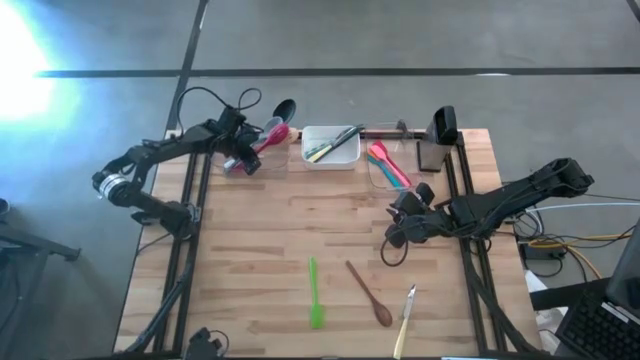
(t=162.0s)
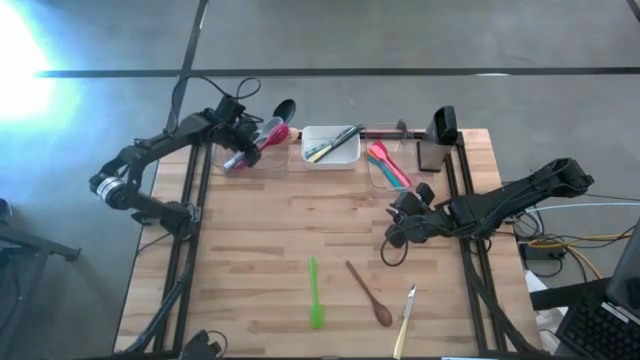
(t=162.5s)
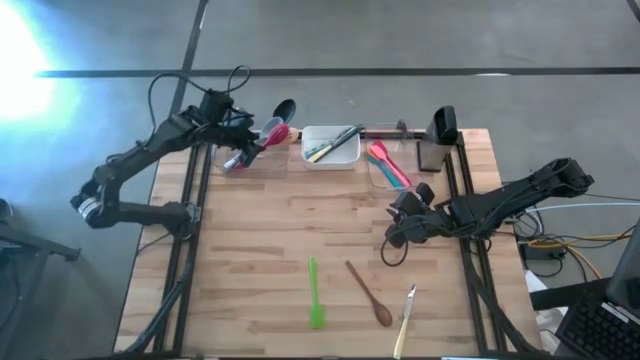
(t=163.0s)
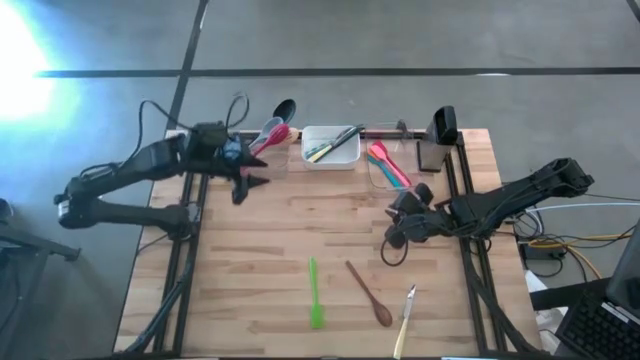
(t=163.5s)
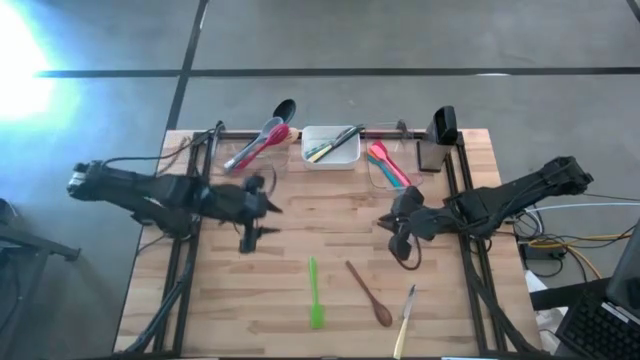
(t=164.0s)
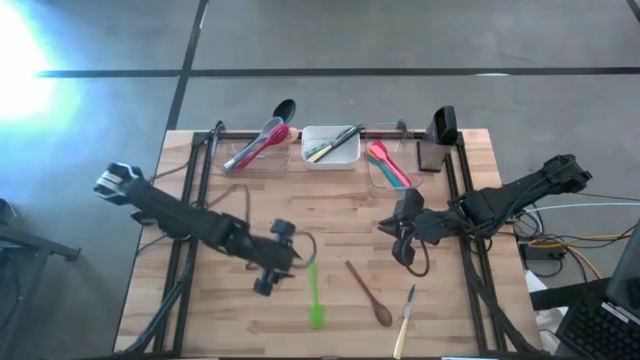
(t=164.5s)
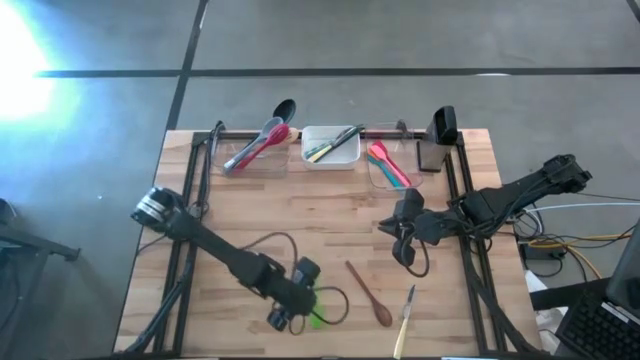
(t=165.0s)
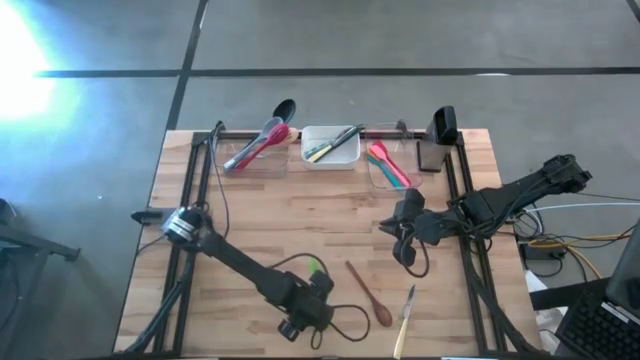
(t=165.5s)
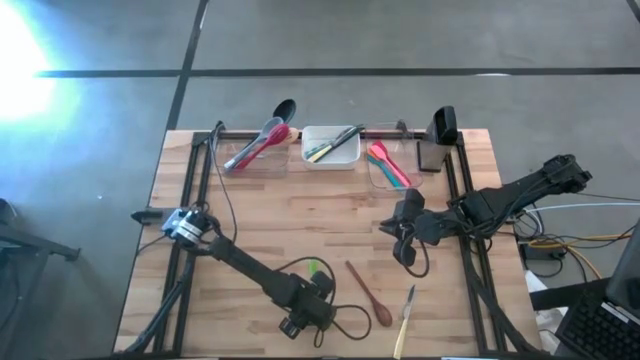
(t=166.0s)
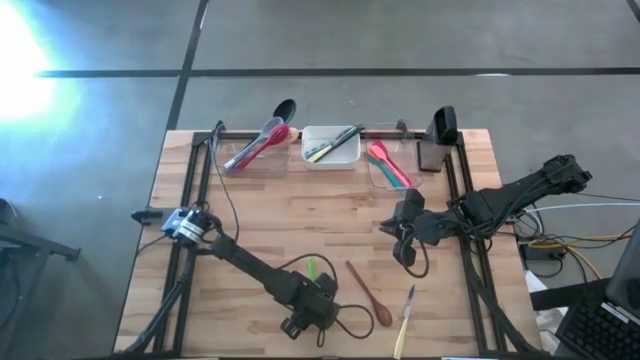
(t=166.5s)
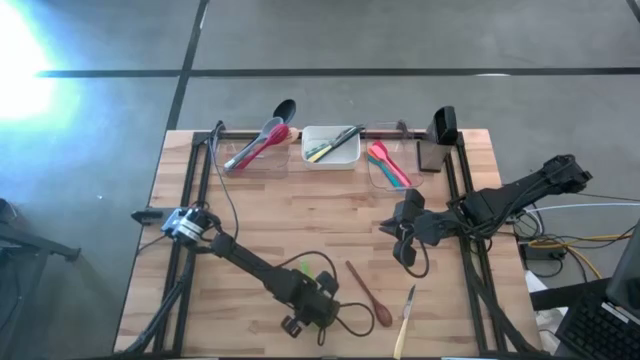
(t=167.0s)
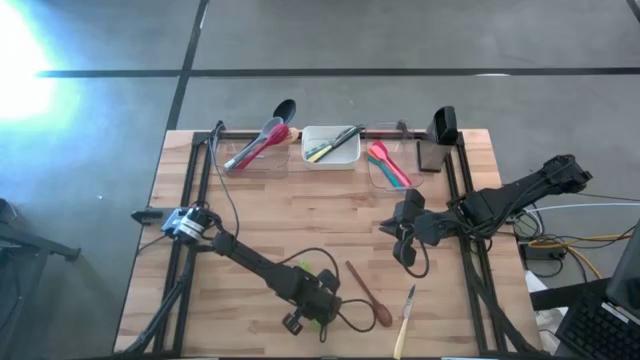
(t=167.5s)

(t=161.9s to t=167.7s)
Task: Pick & Place Kitchen Items
Put the green spatula into the right transparent bin

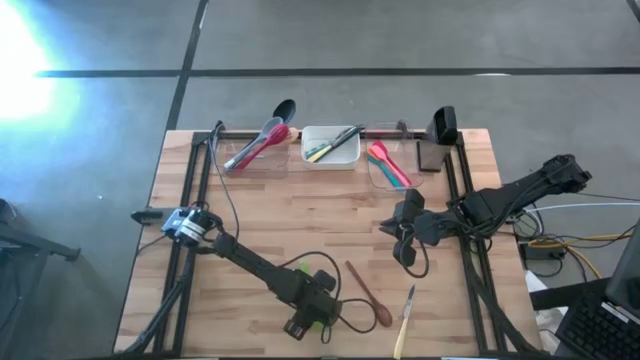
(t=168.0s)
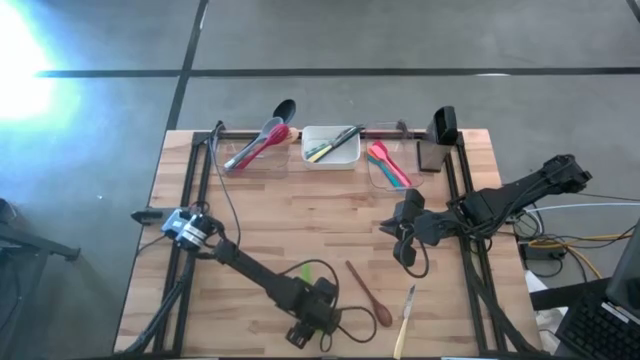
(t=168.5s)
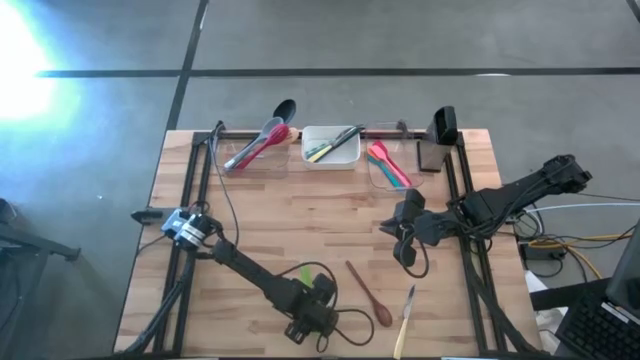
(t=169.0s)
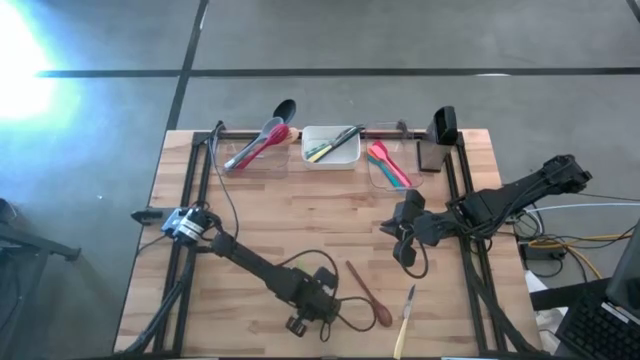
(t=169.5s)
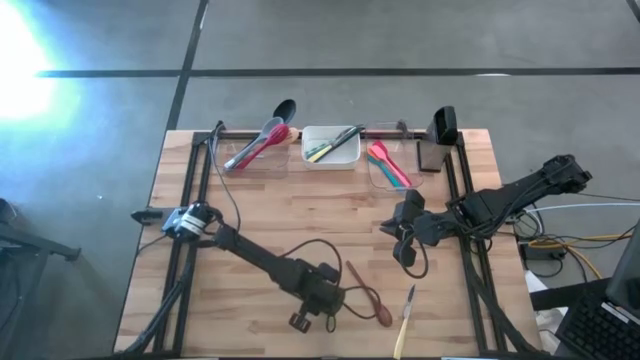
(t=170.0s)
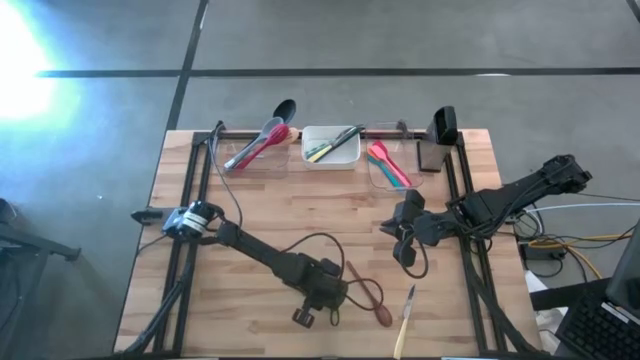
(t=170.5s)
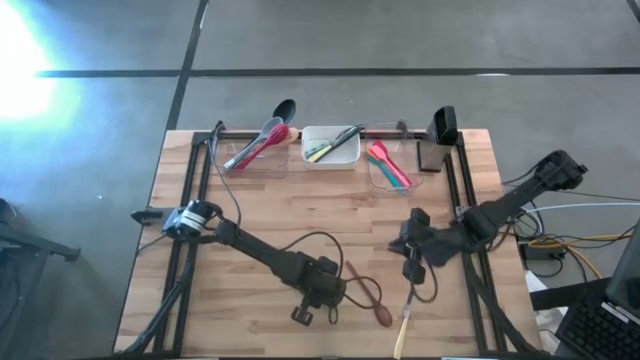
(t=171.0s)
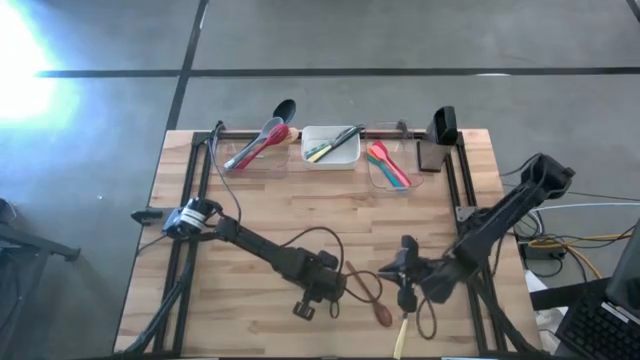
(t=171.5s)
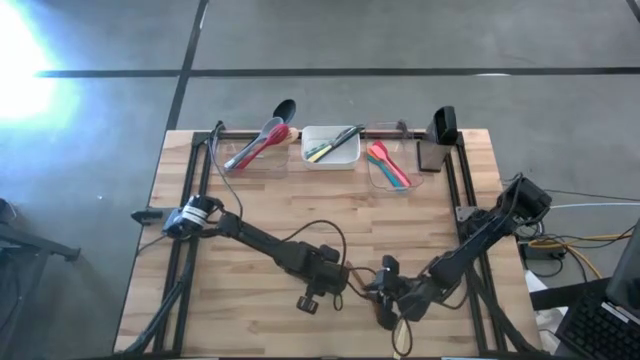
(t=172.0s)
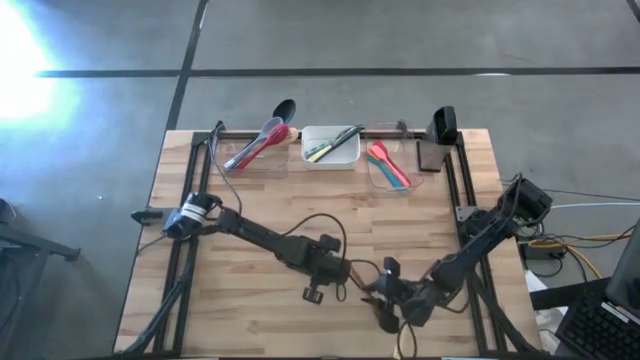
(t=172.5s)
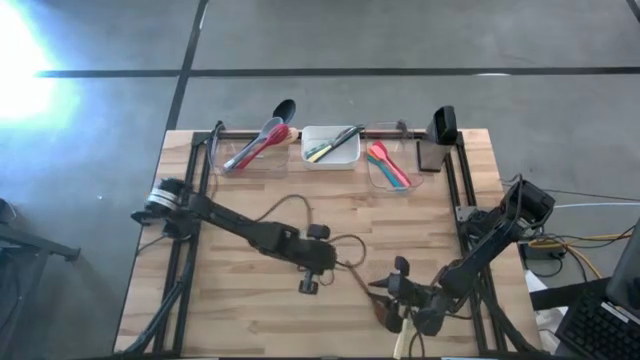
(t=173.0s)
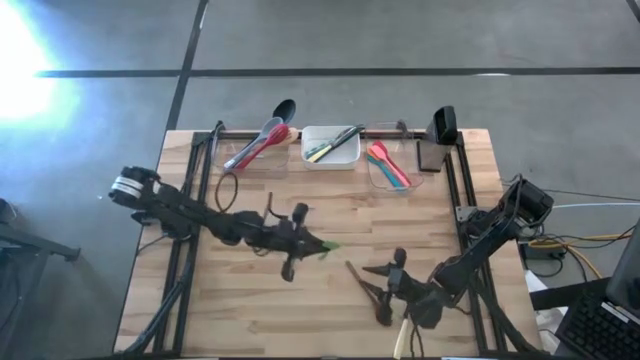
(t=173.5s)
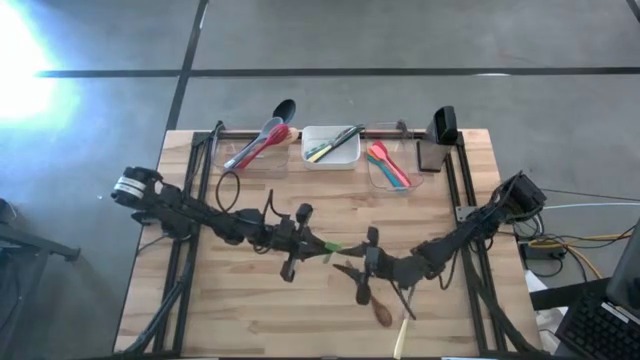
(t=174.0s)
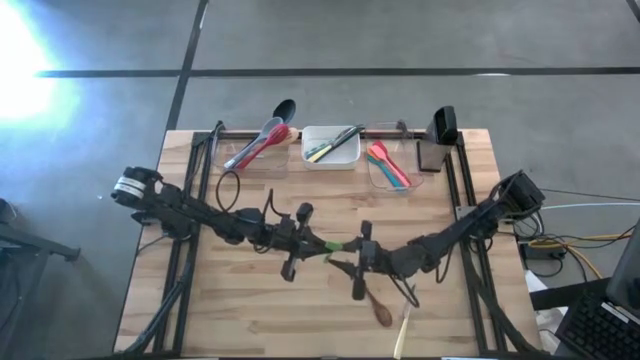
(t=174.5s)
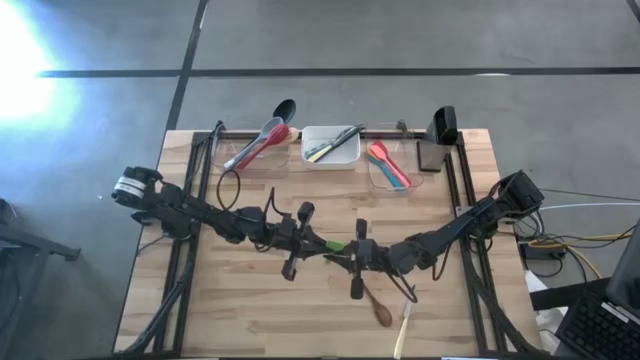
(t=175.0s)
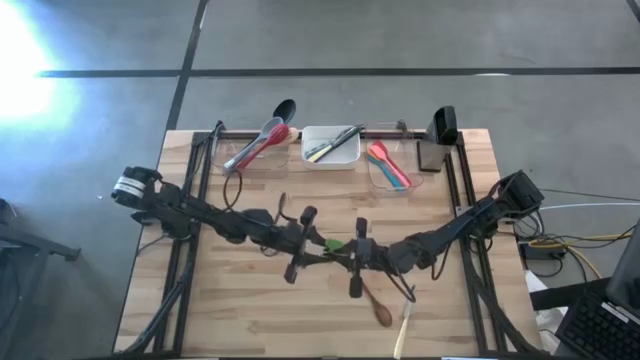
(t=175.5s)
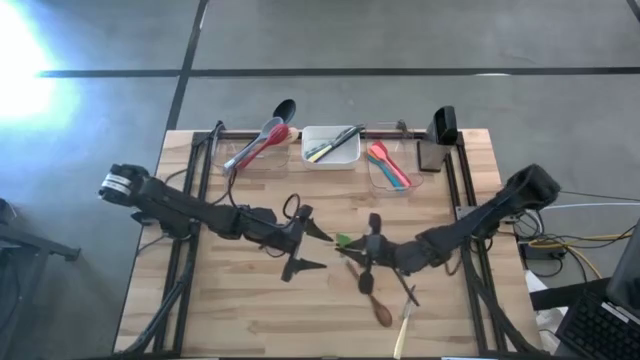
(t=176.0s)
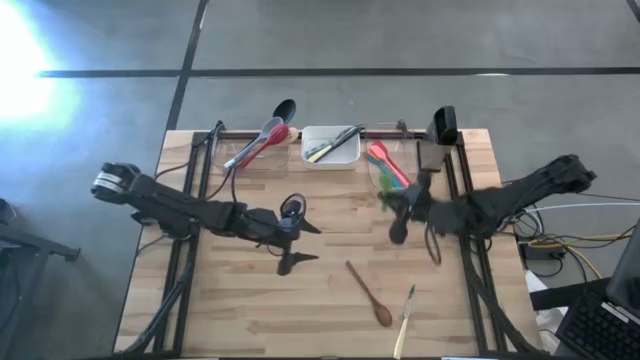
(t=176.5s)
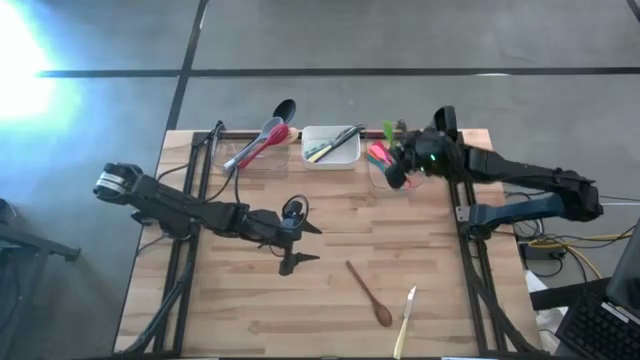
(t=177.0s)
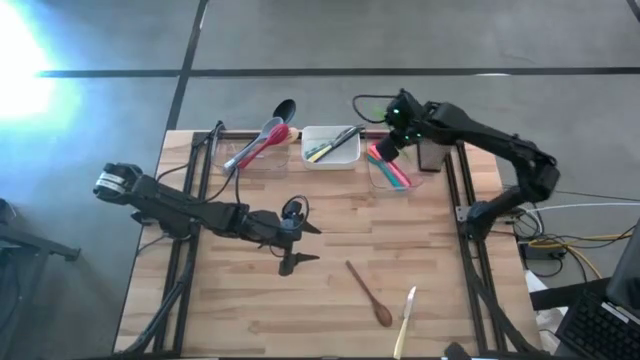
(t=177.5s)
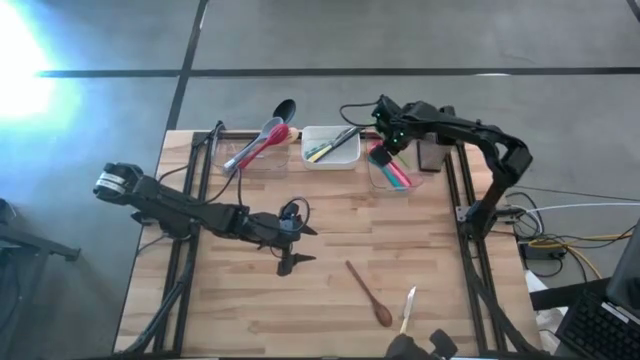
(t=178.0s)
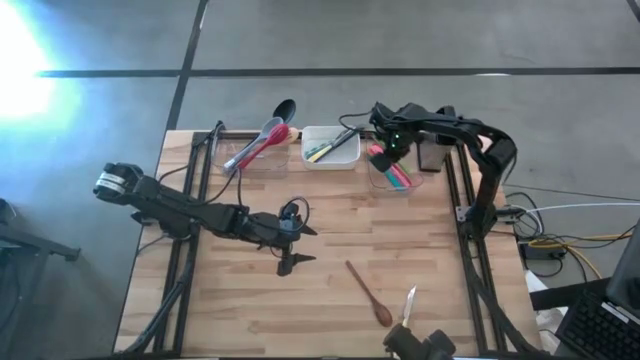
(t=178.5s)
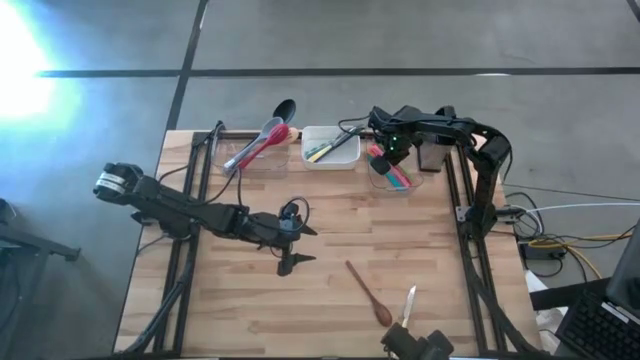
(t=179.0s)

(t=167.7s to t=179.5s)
Put the green spatula into the right transparent bin

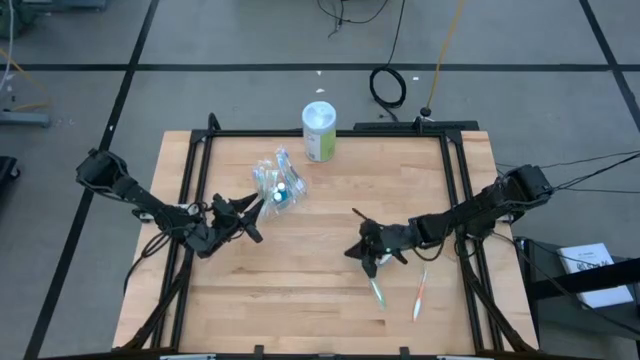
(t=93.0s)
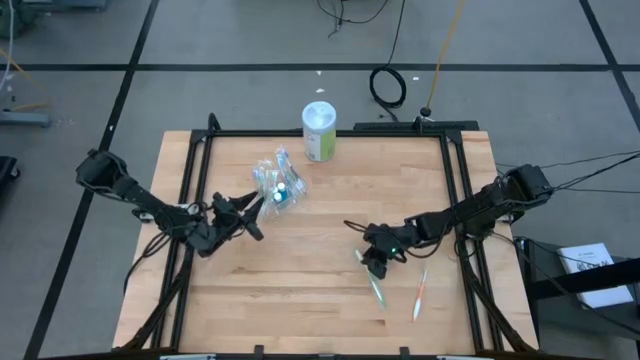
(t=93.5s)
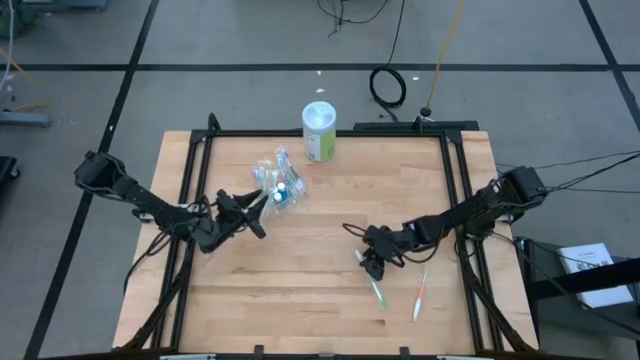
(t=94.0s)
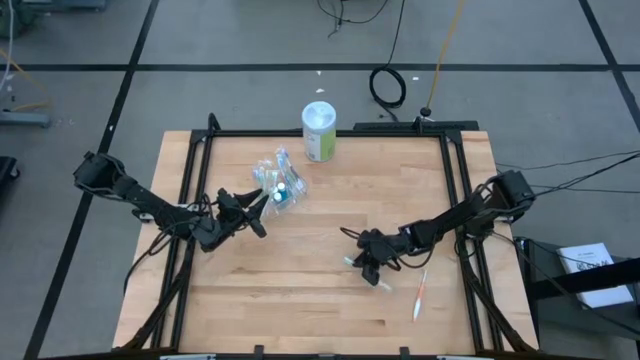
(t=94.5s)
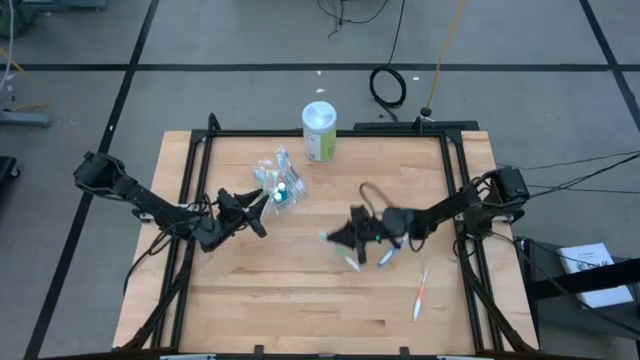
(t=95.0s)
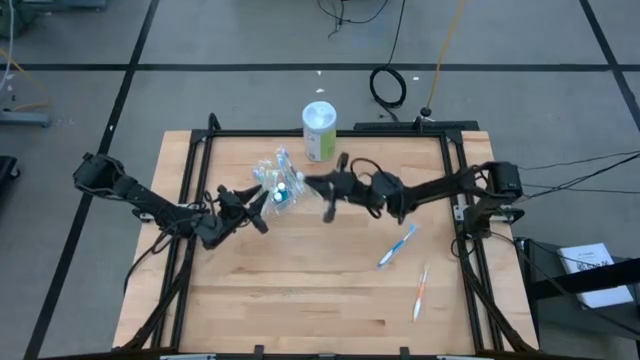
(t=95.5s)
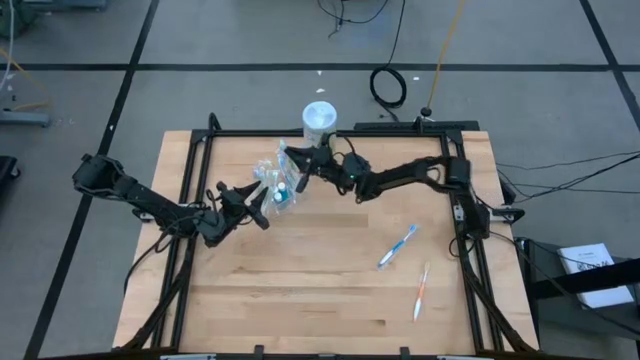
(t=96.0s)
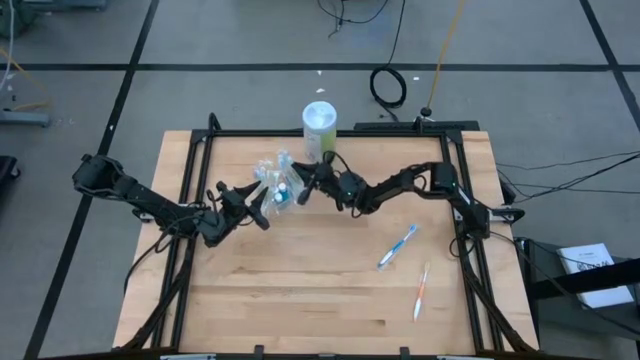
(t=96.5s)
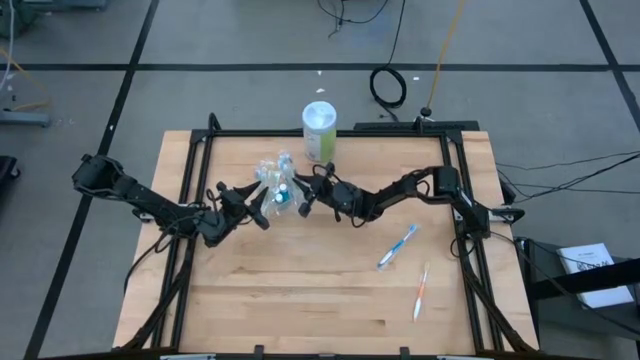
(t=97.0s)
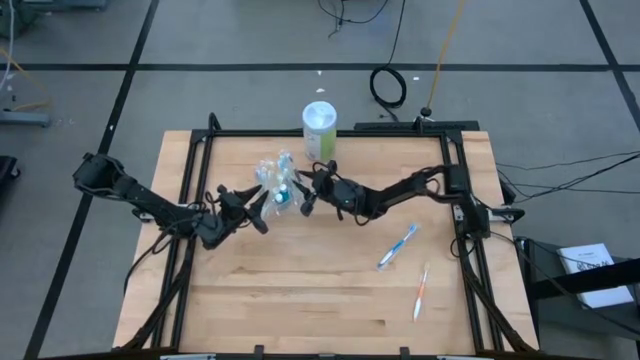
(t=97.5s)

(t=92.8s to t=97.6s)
Task: Pick & Place toothbrushing station
Put the green toothbrush into the transparent organizer
